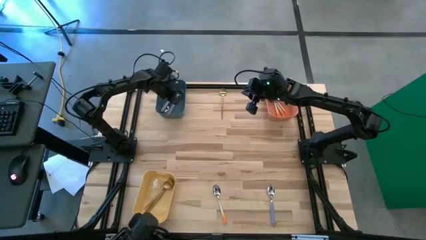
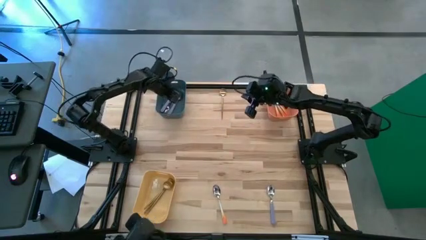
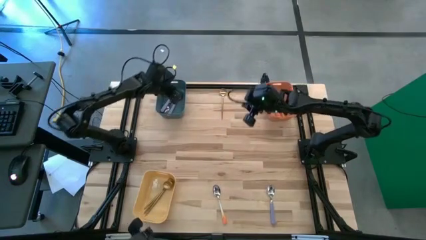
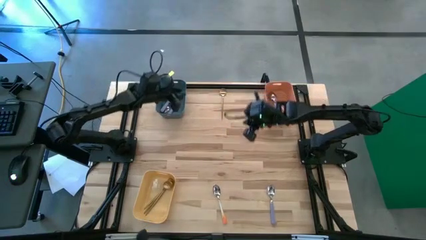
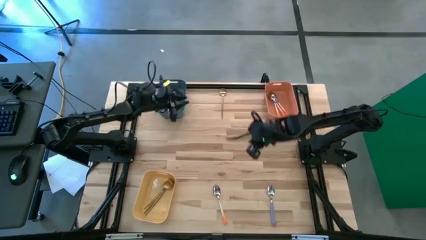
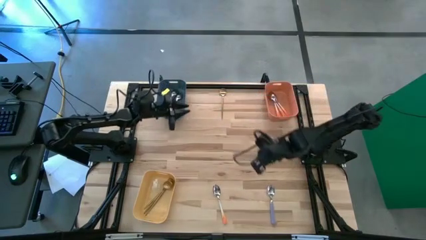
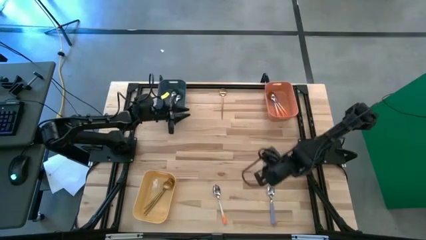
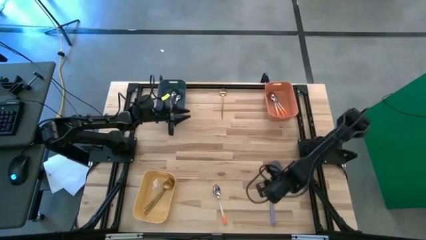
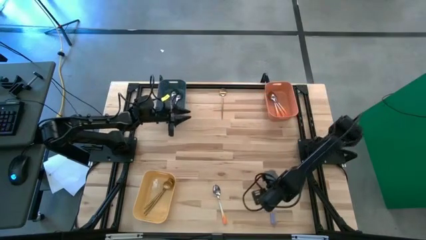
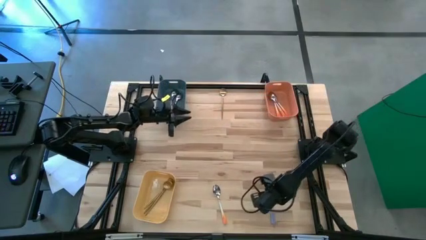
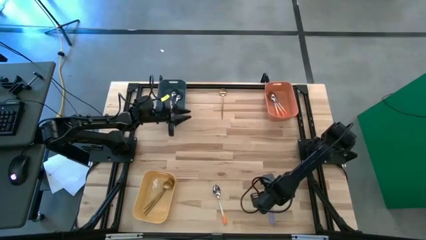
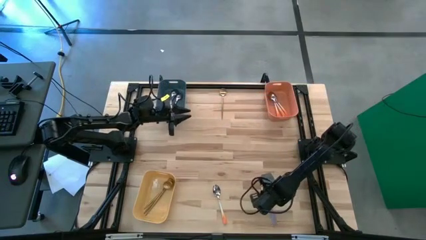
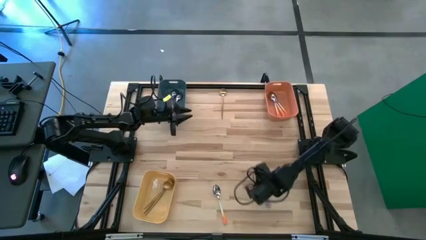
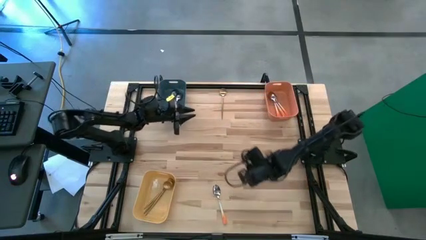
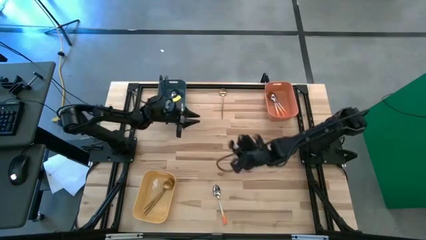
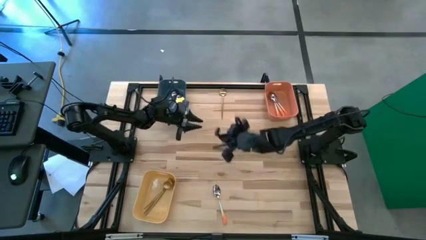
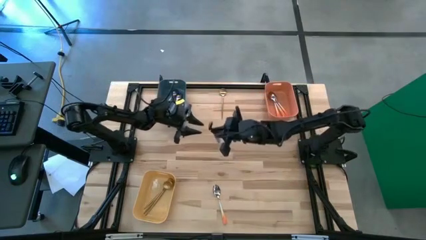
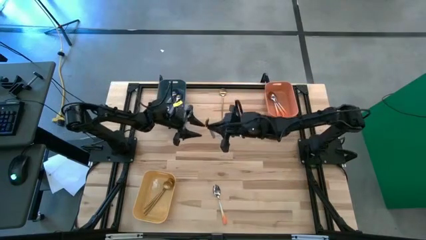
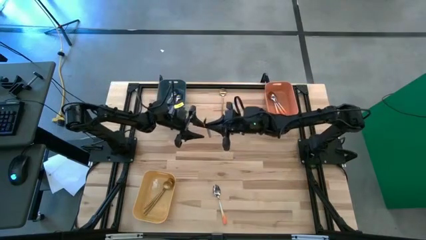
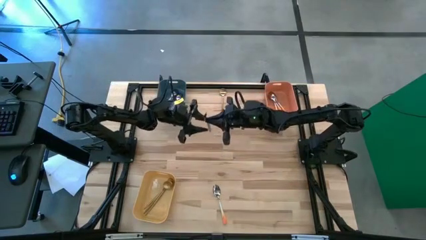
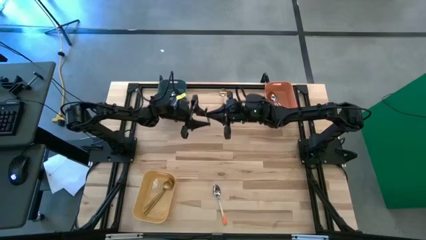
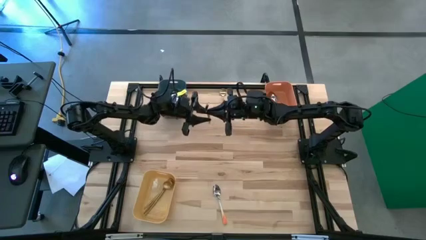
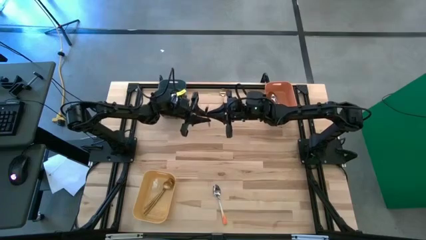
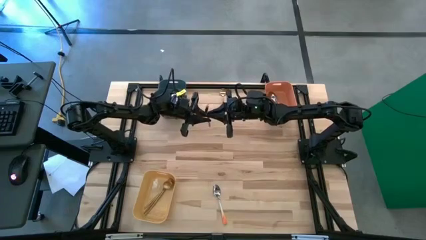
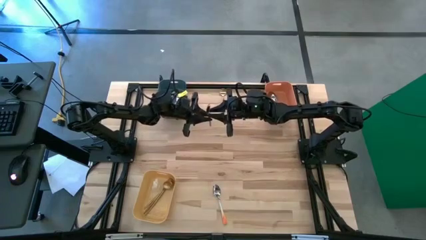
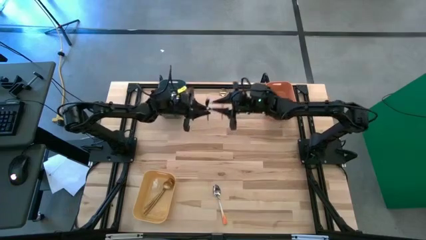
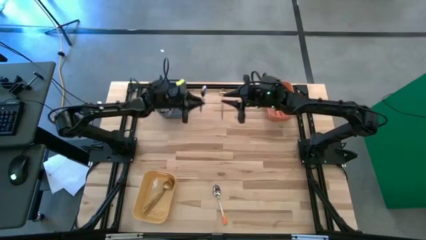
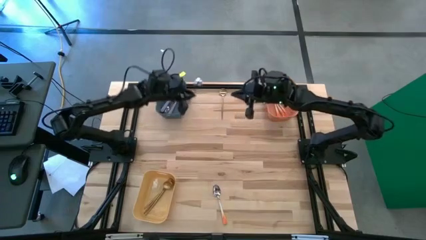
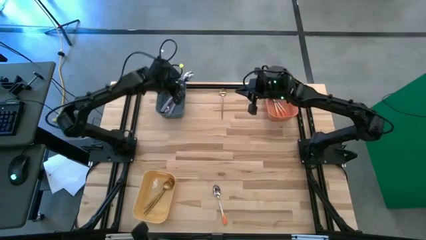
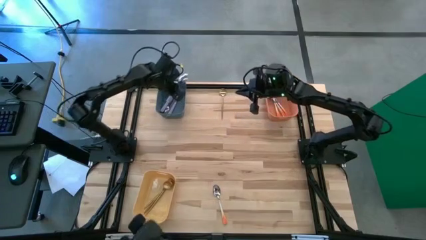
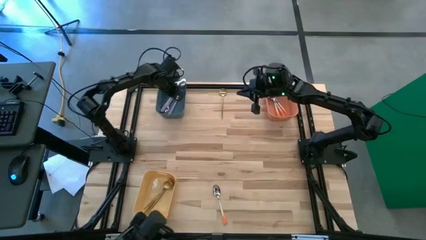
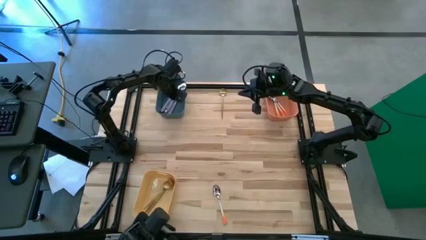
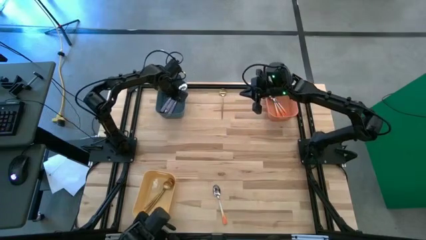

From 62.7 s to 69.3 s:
Task: Sort silverware by color (type)
Put the purple spoon into the blue bin

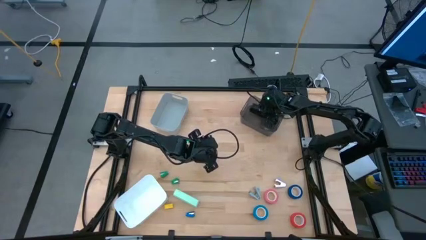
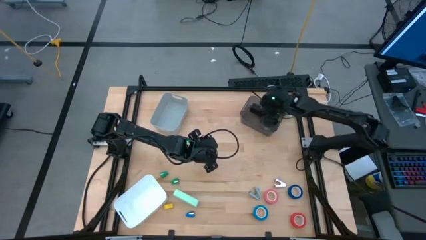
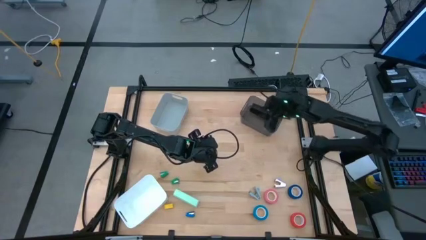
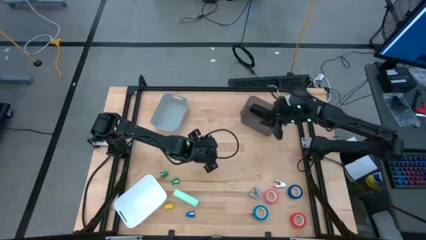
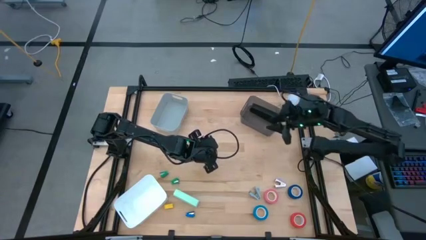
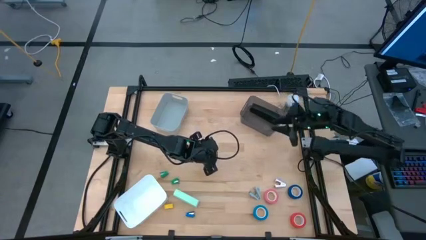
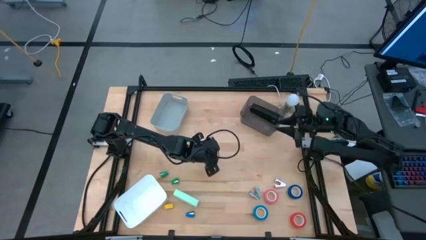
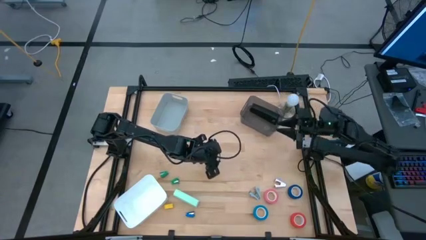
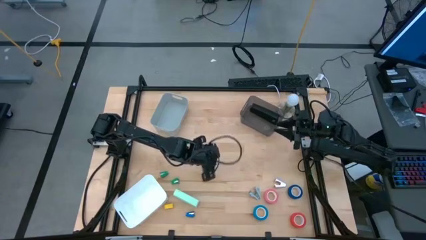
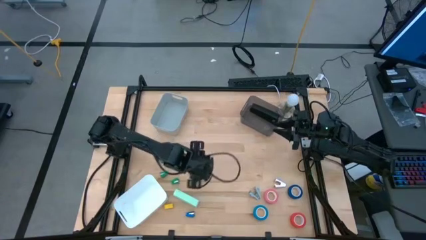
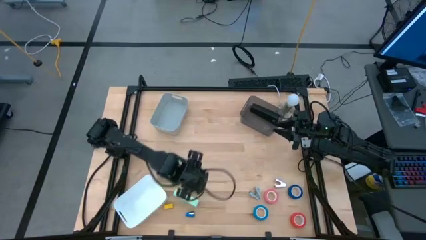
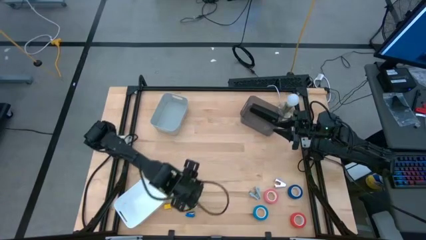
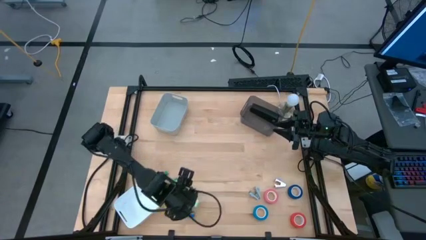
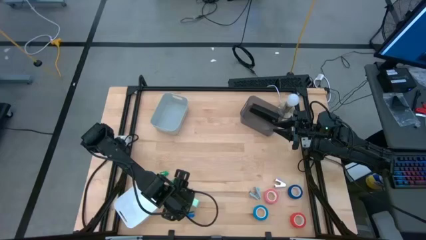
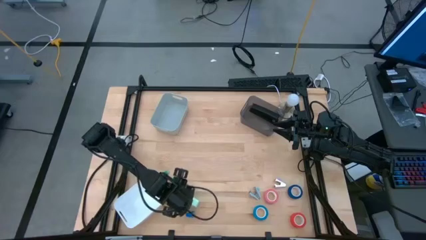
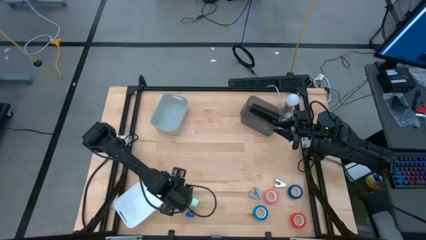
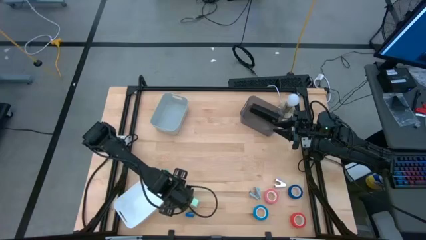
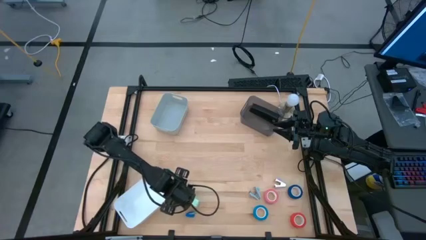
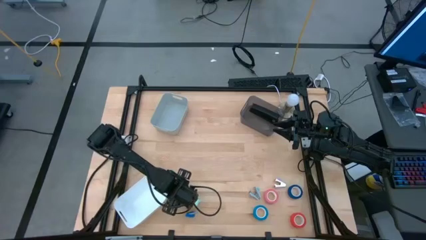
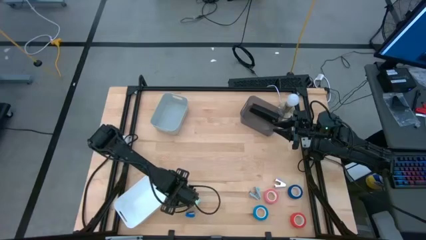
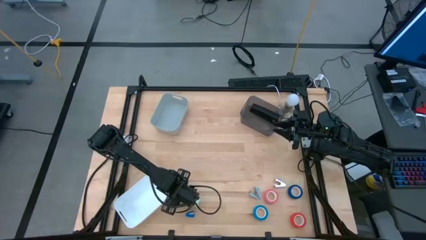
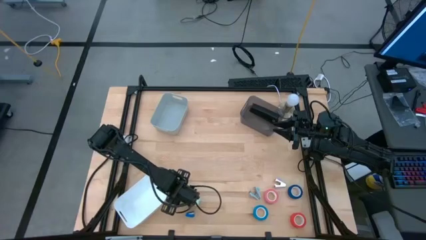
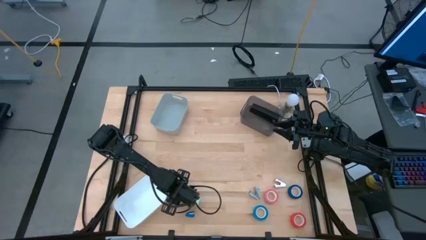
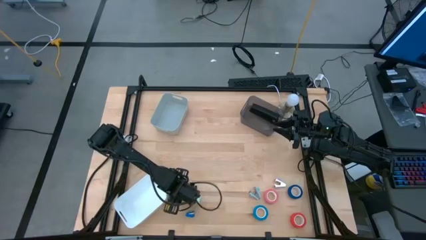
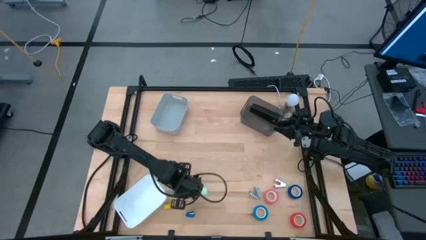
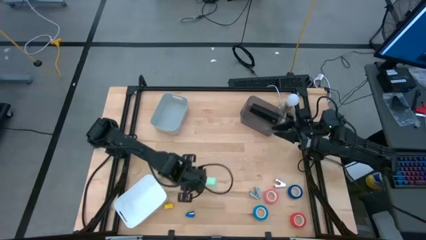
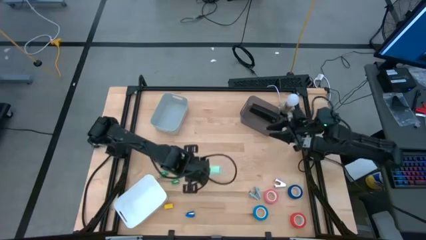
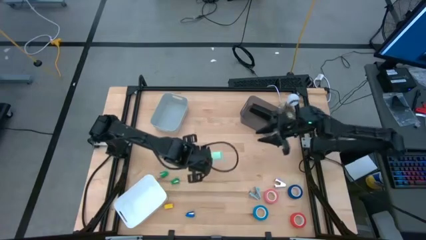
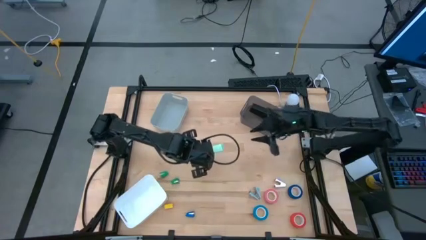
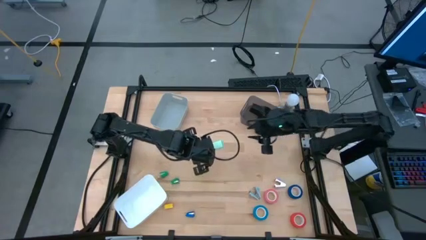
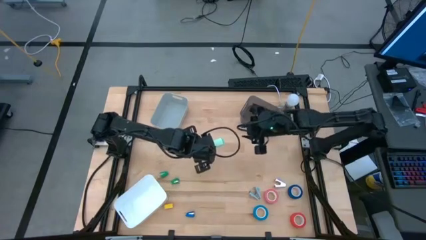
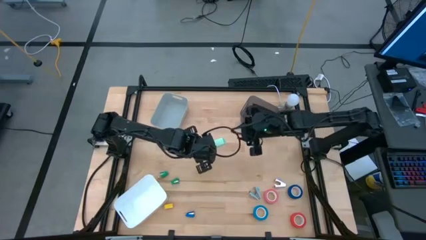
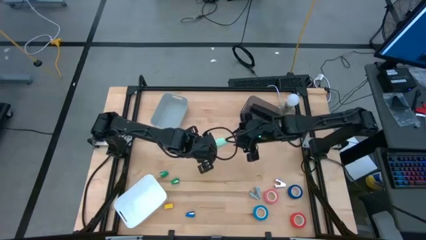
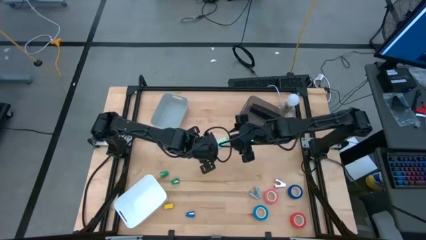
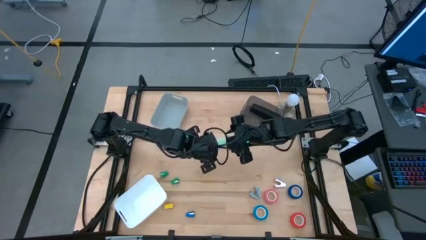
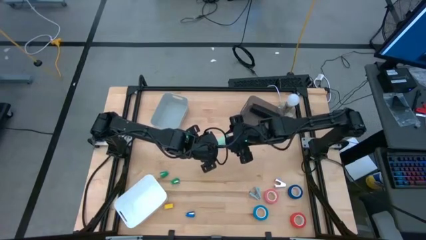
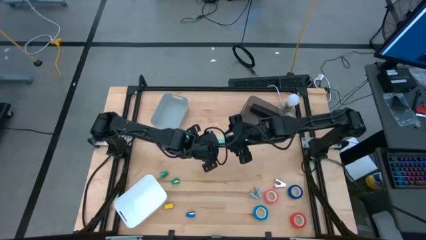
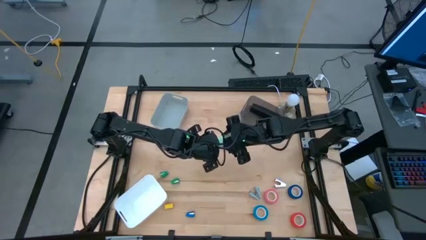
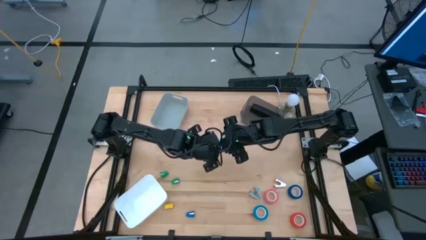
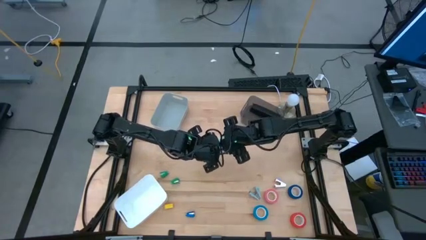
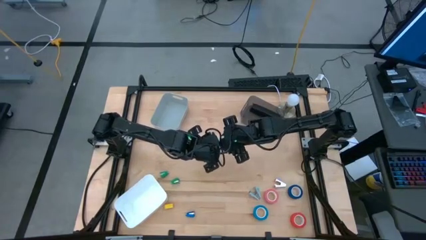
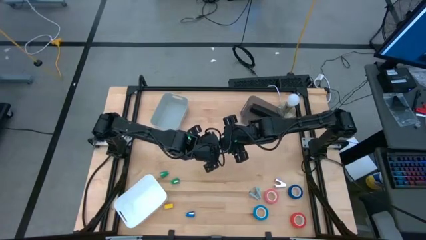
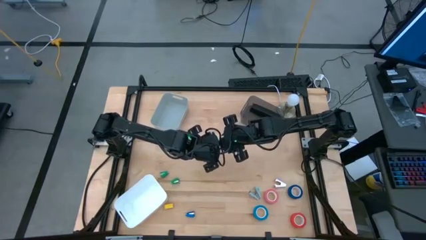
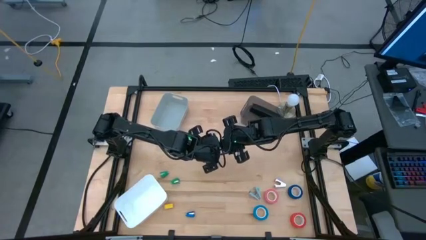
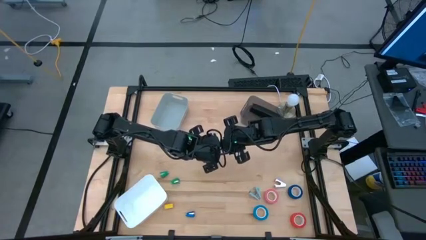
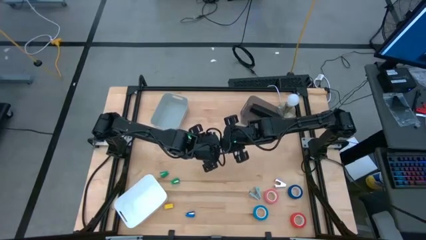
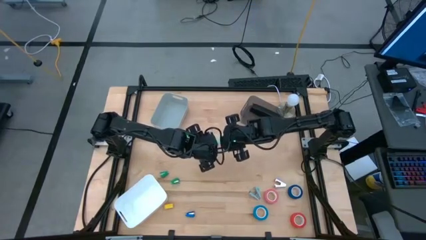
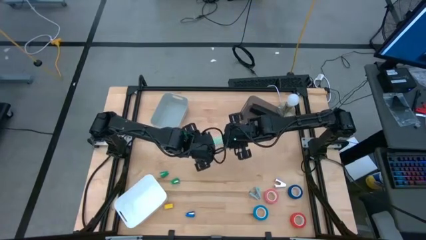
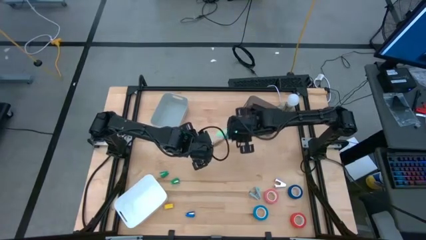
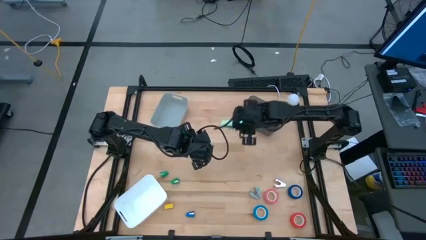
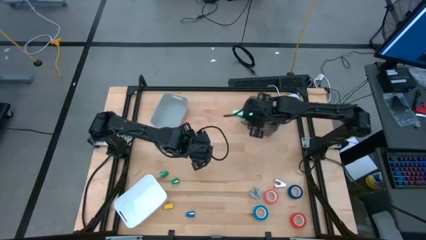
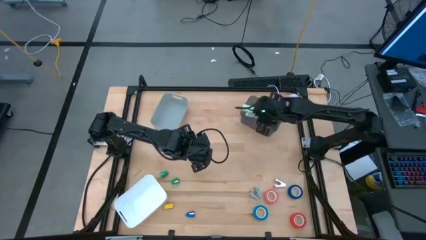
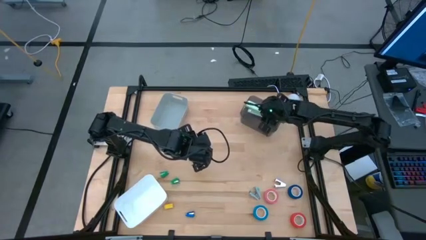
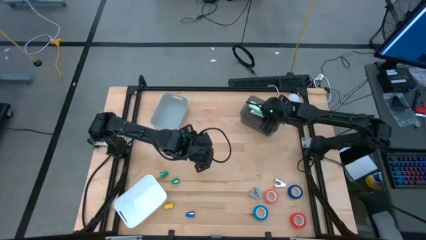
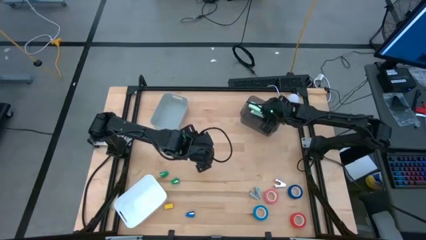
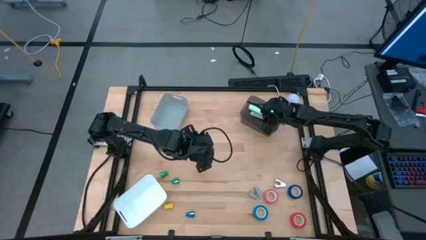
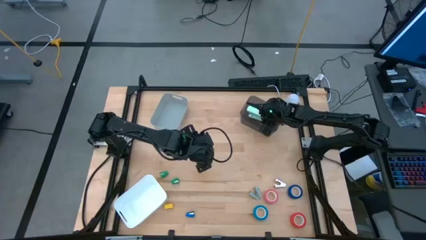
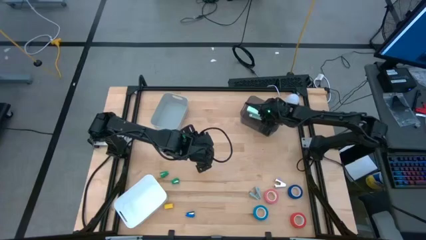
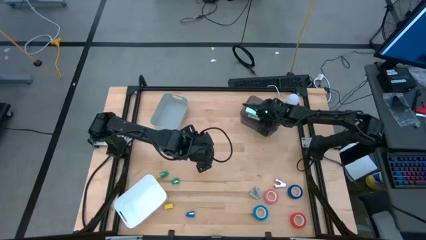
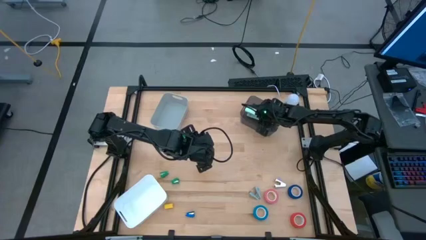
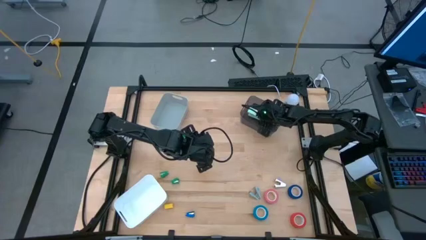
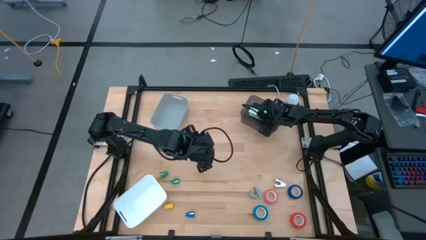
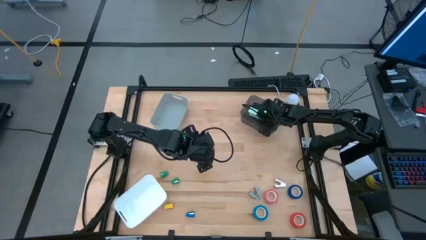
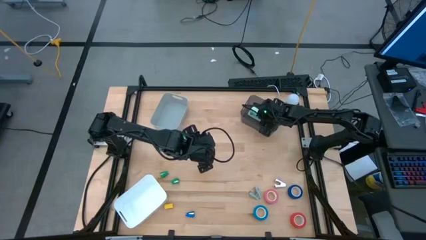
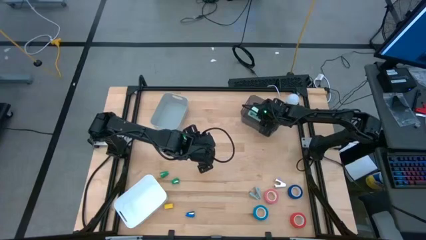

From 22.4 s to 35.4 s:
Task: Pick and place Stapler, Stapler remover, tape
Put the light green stapler into the black bin
